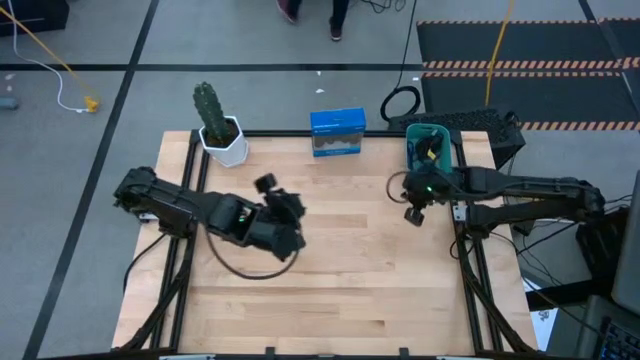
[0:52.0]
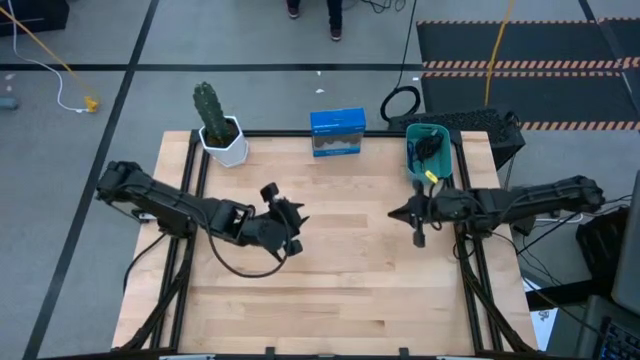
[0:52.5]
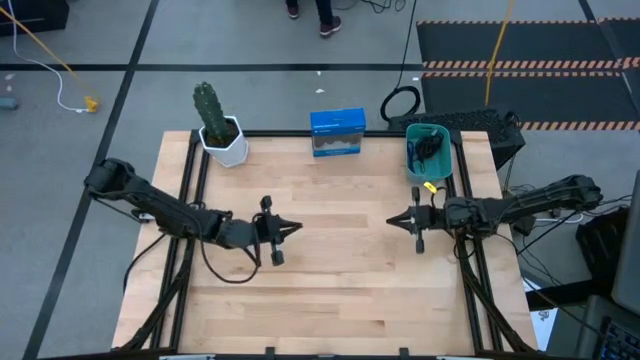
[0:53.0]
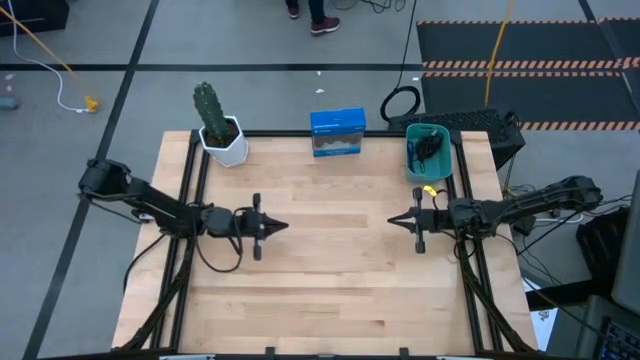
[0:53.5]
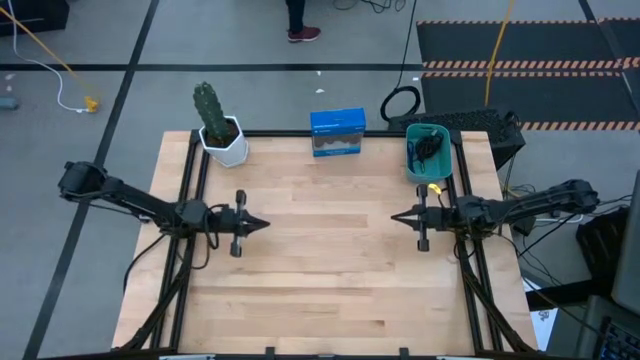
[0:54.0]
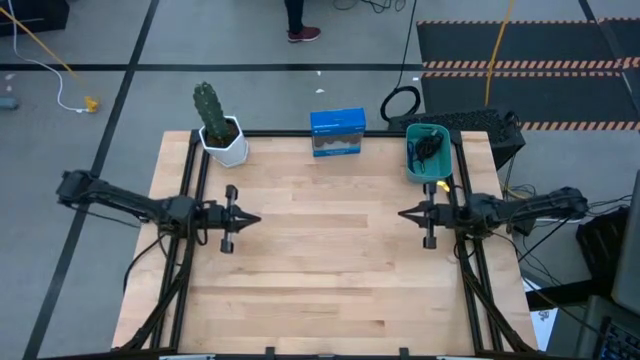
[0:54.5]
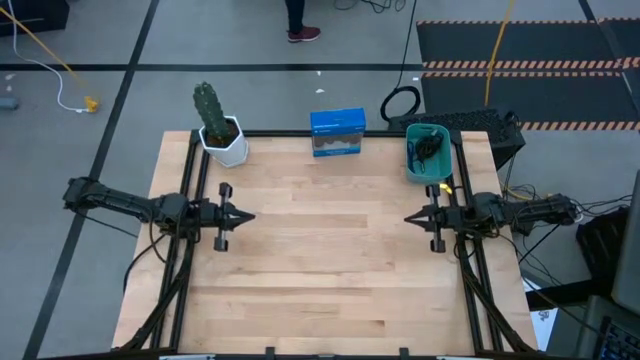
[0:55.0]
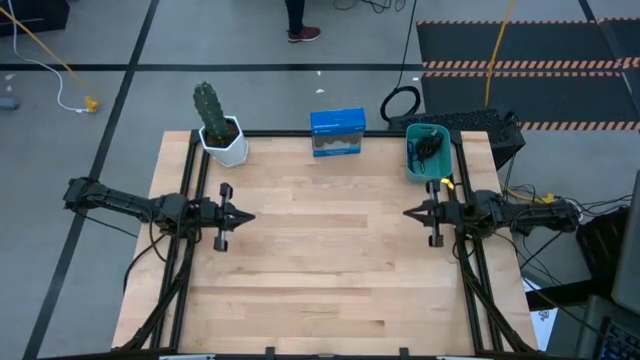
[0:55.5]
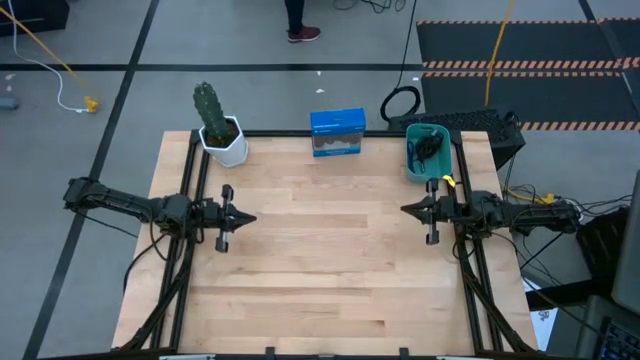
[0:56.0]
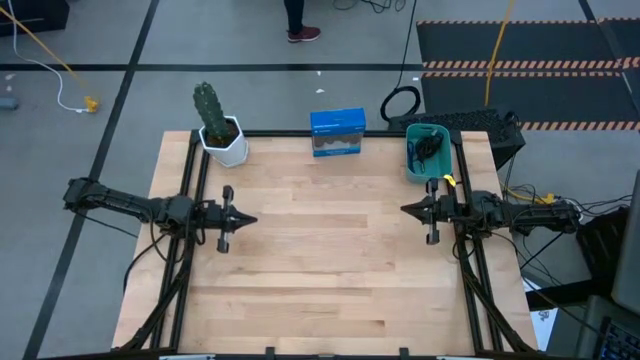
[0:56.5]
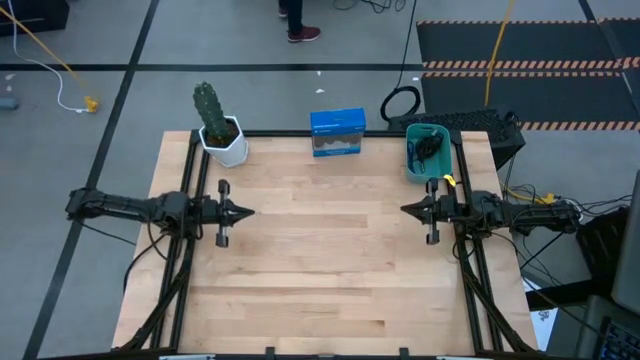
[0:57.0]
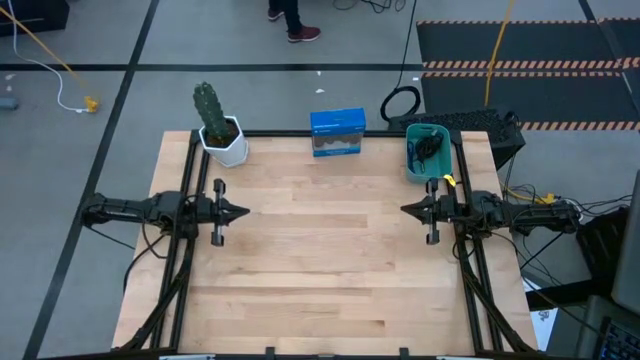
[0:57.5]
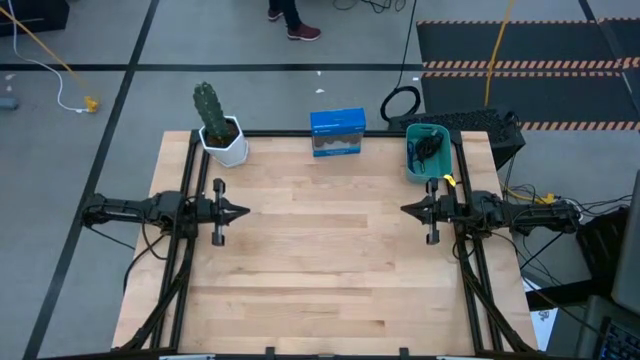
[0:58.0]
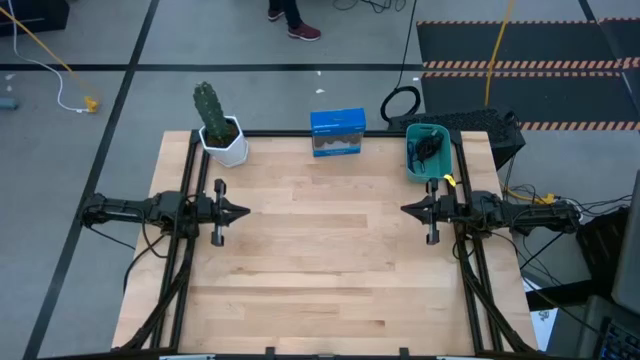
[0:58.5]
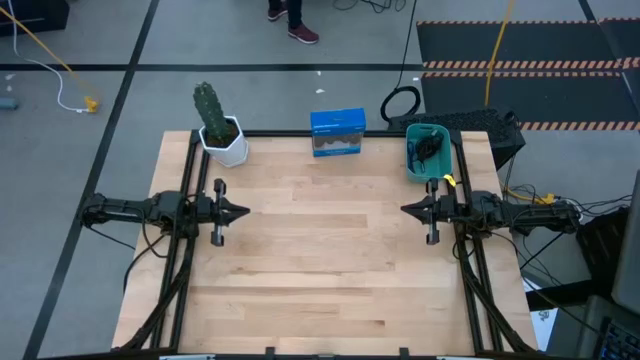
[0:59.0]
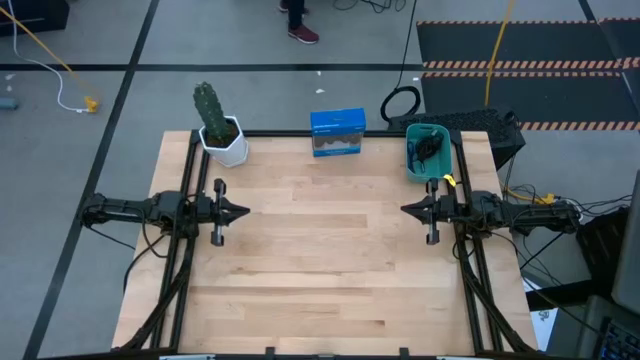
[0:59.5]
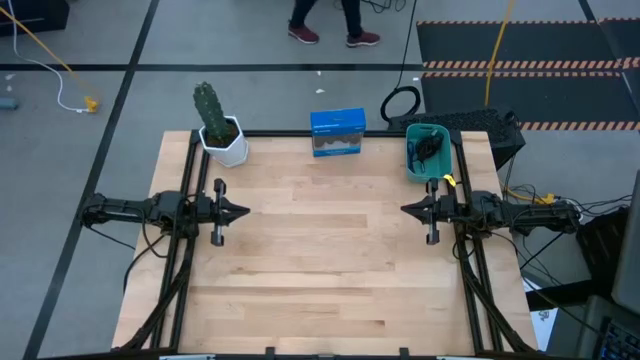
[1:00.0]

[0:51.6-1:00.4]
Task: Pick and place USB-C Cables
Return to Home Position

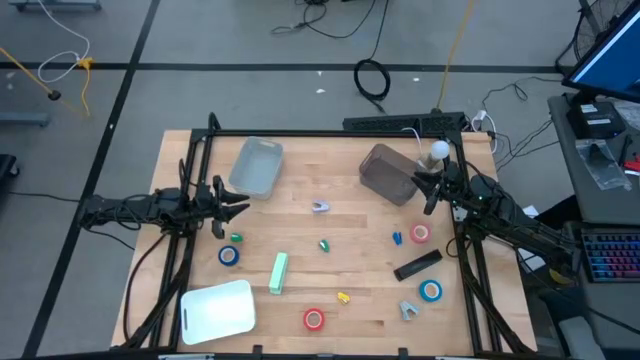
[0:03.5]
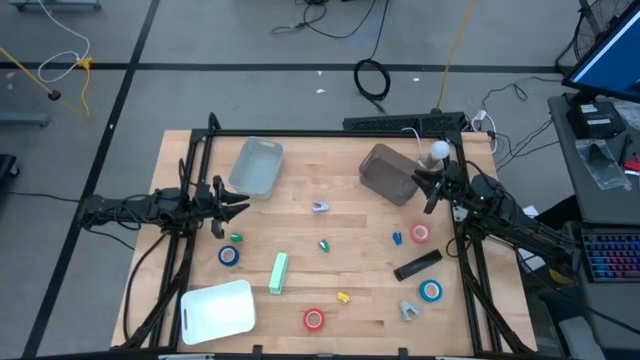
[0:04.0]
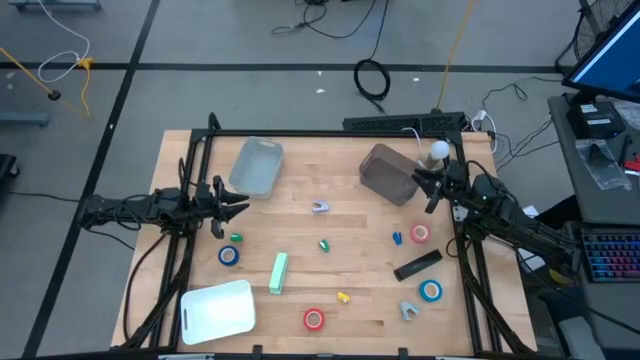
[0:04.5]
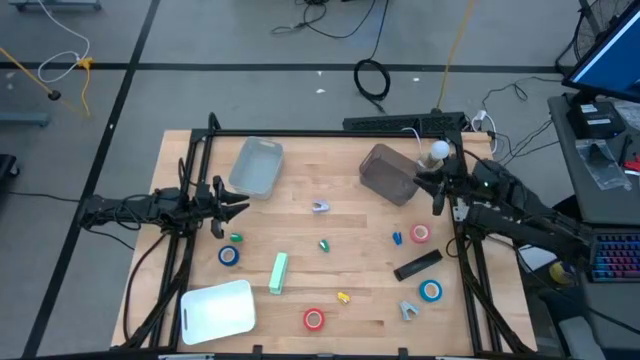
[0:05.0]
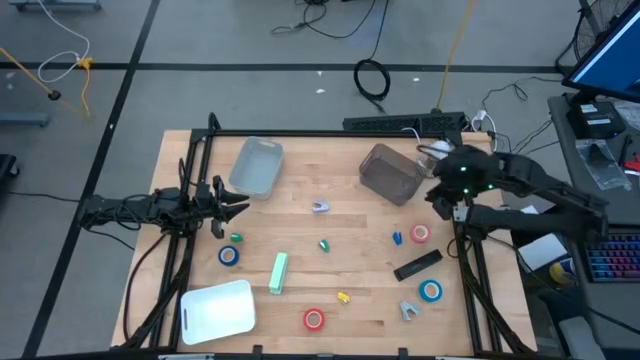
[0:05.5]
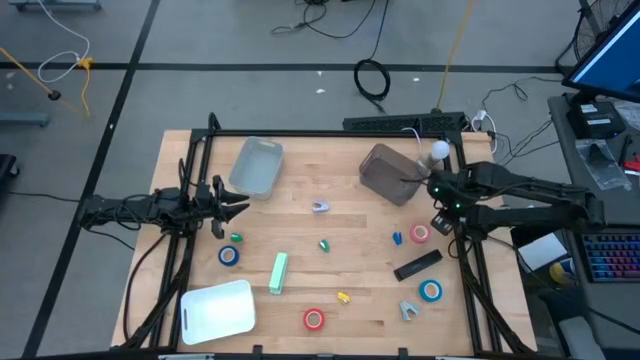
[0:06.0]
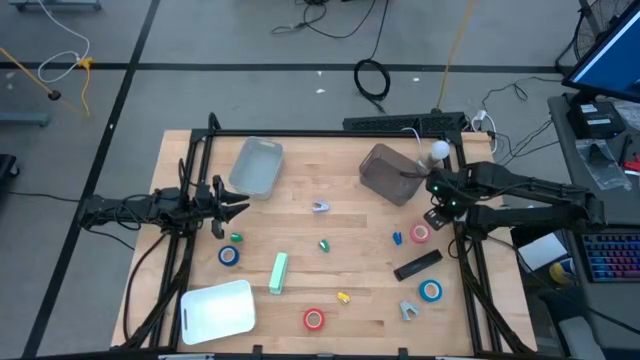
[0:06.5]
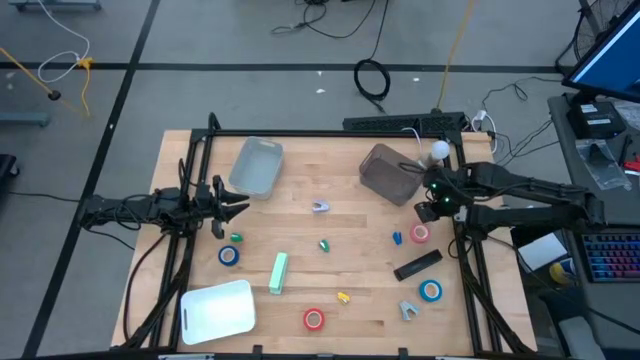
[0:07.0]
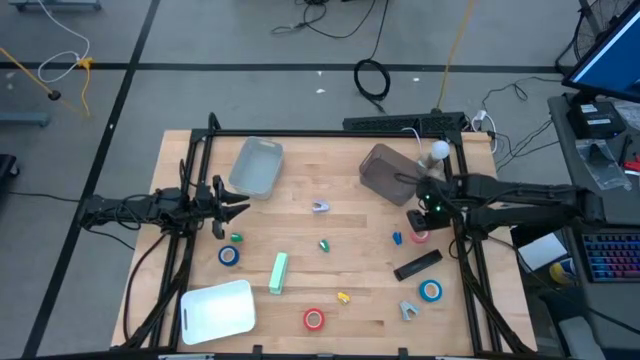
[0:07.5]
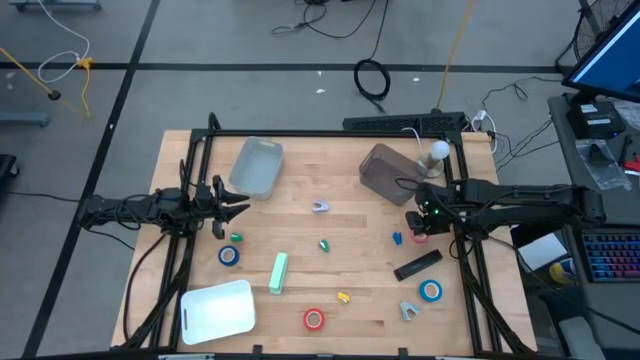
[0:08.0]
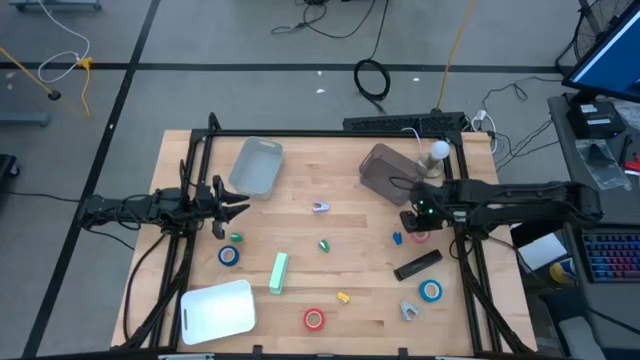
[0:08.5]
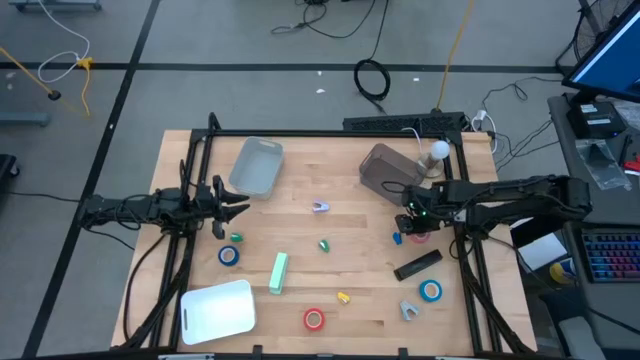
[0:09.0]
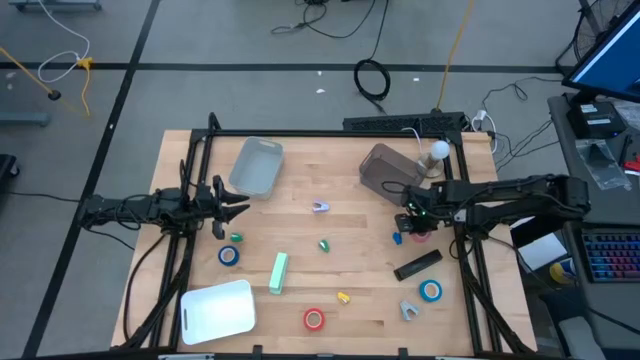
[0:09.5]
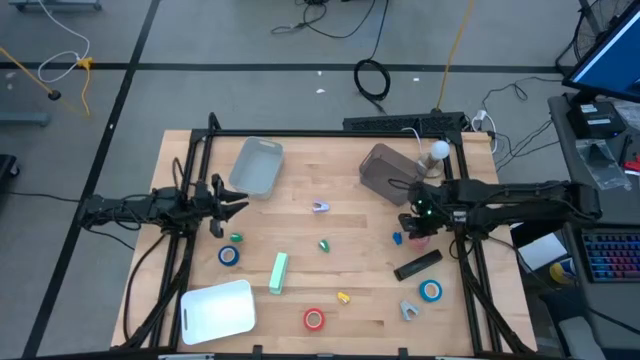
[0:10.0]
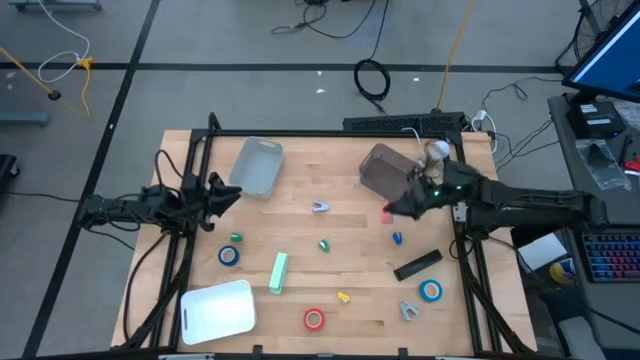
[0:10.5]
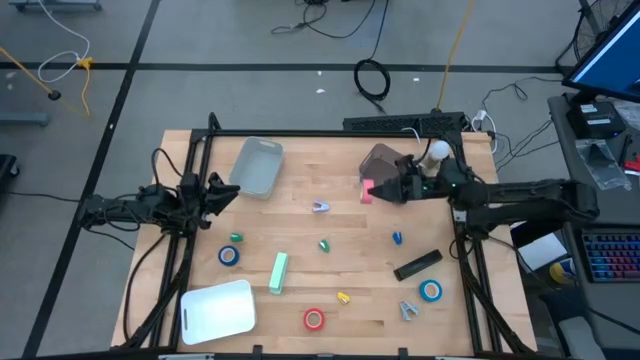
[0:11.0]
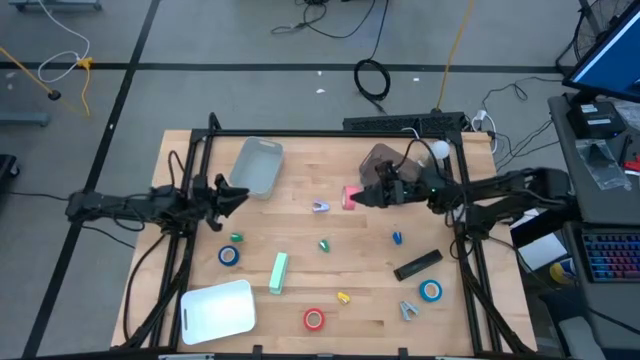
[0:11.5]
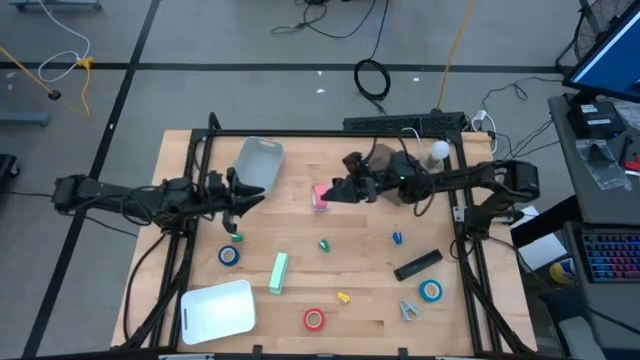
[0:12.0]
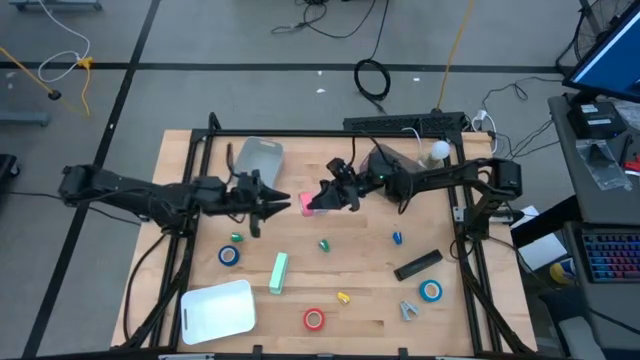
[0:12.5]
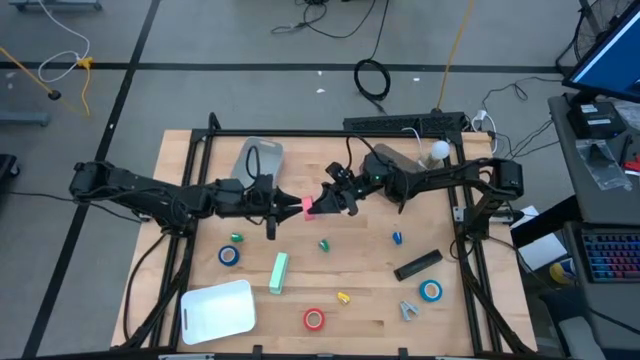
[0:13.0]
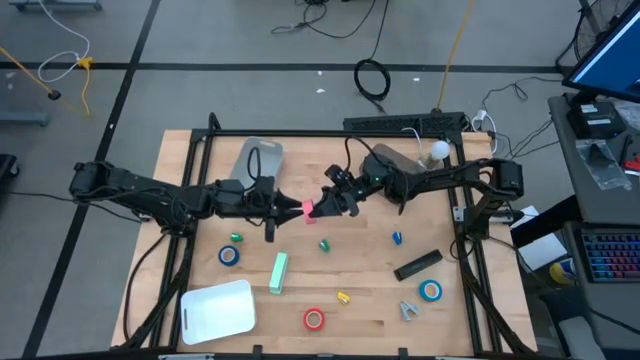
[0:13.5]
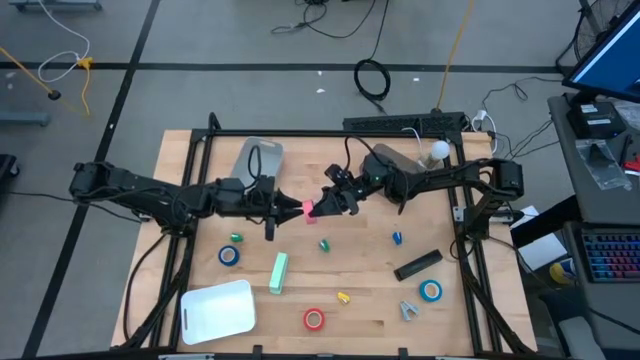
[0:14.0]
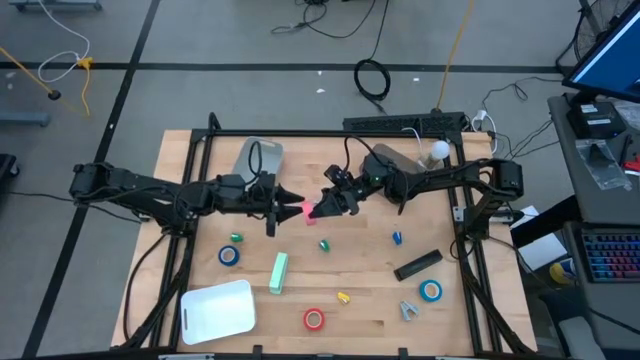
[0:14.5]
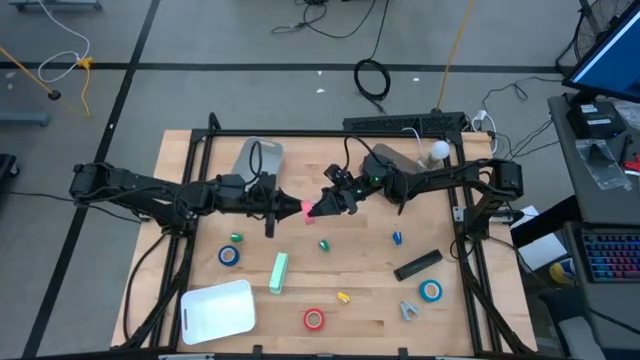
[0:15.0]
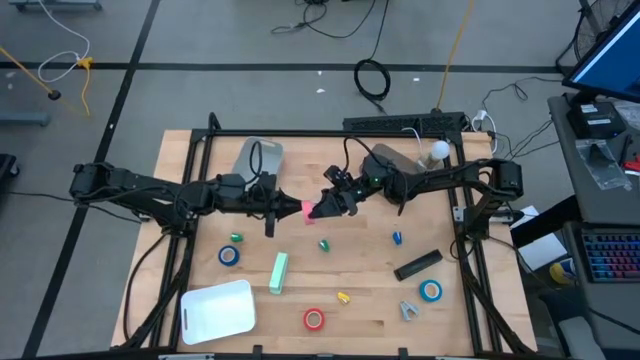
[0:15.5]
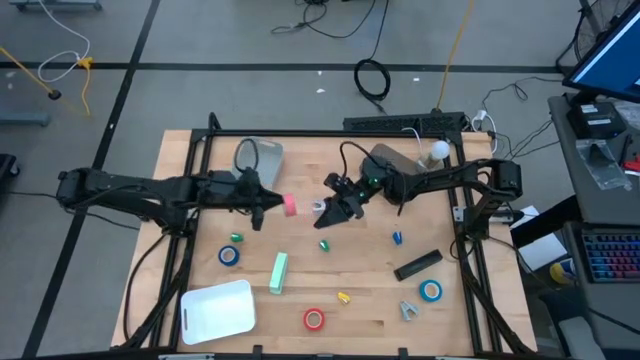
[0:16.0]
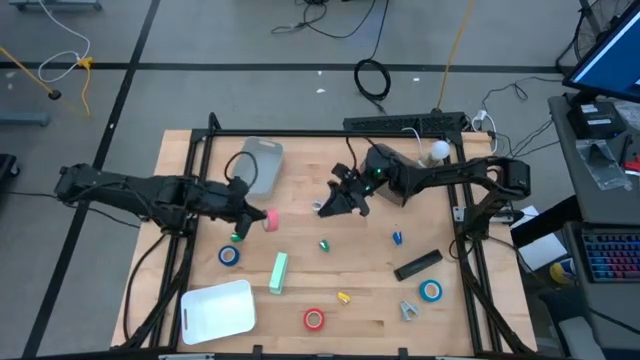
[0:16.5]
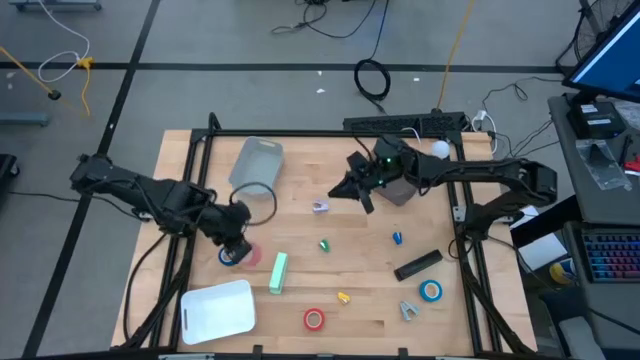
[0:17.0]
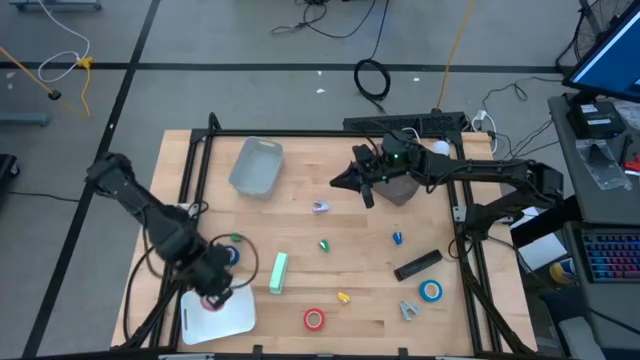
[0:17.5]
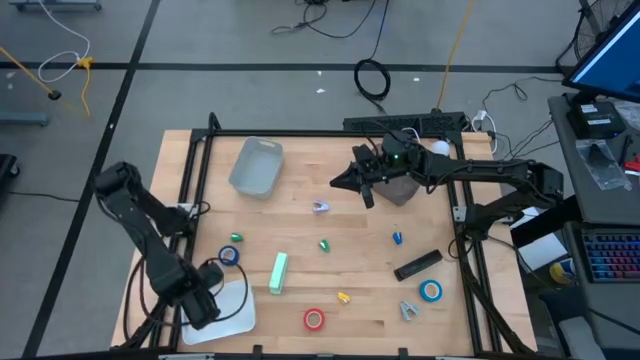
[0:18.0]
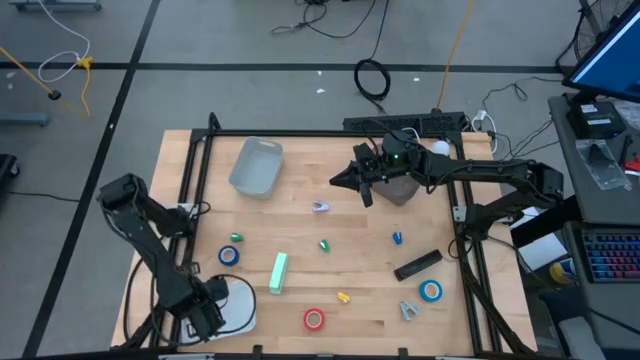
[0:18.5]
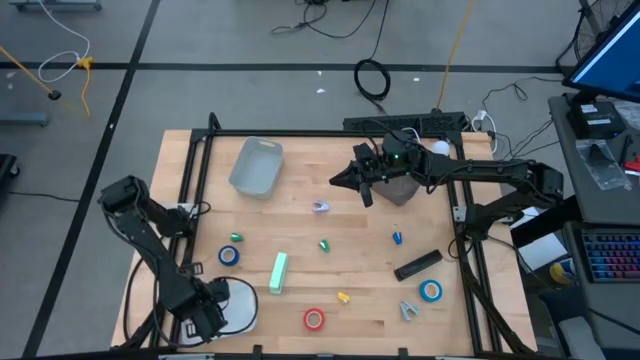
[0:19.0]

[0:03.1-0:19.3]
Task: Pick and place Stapler, Stapler remover, tape
Put the pink tape into the white bin
